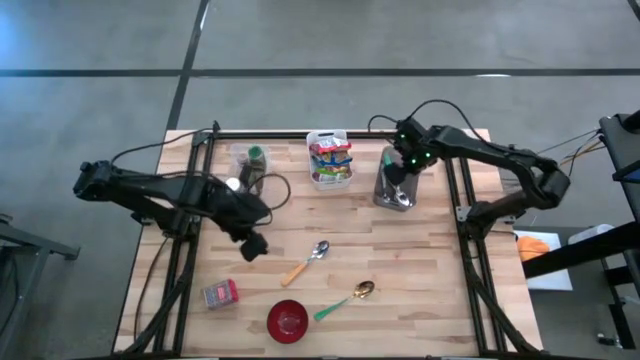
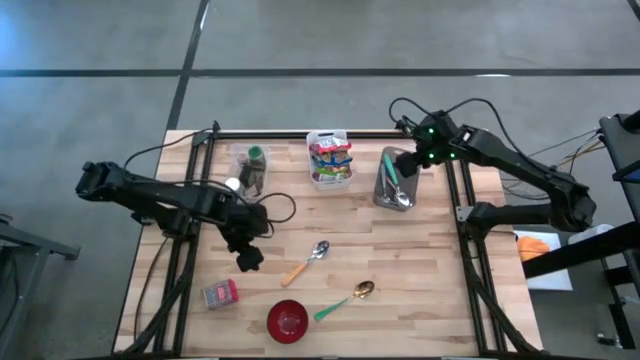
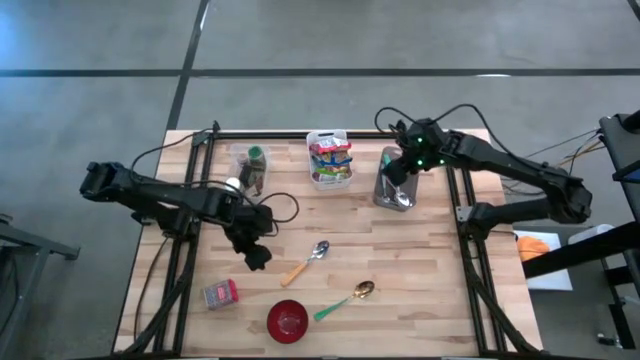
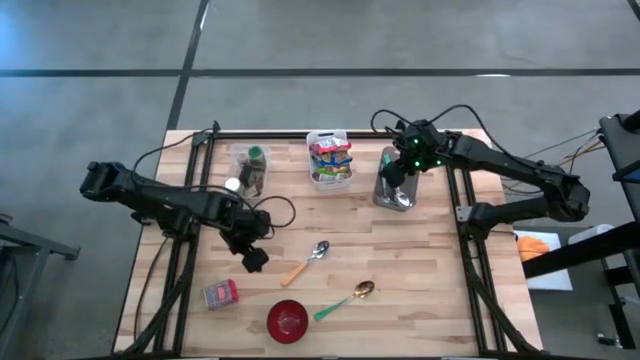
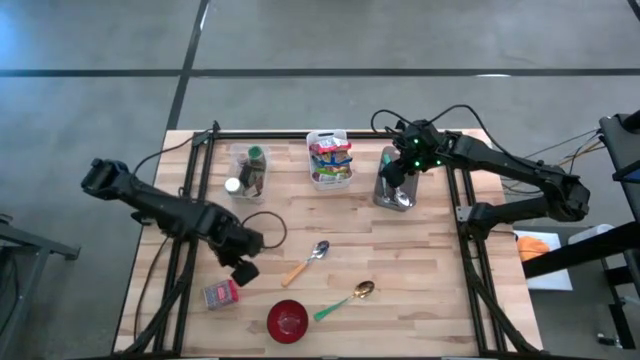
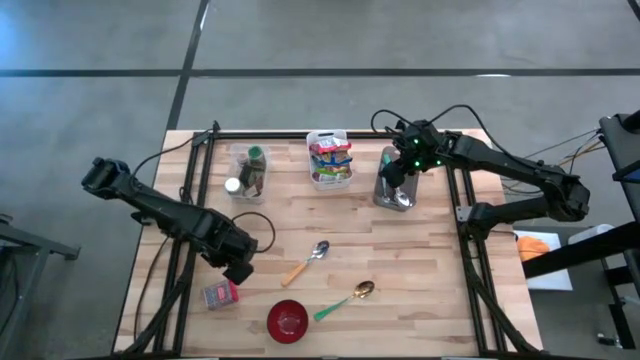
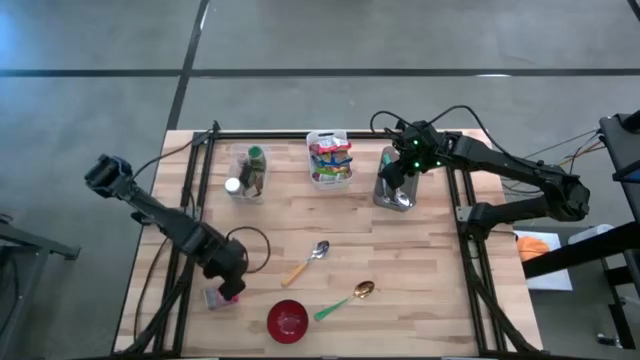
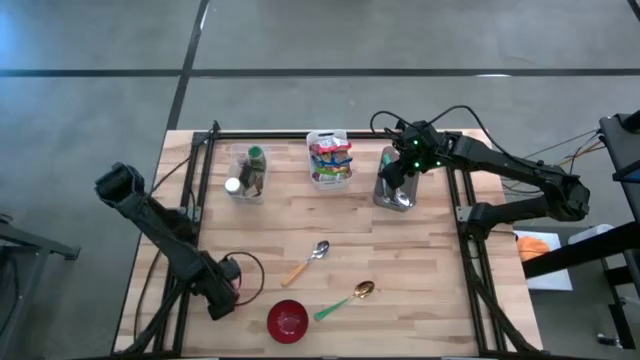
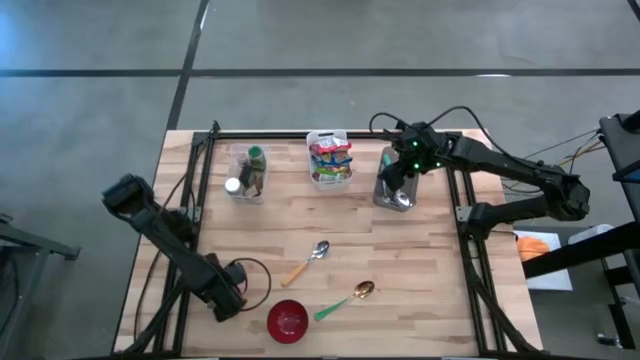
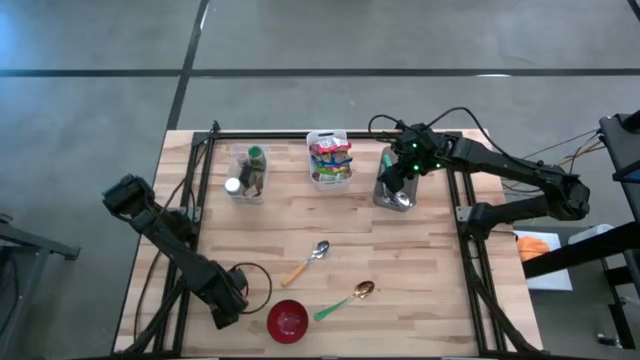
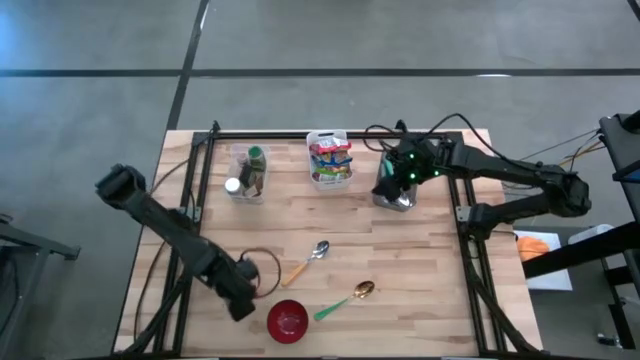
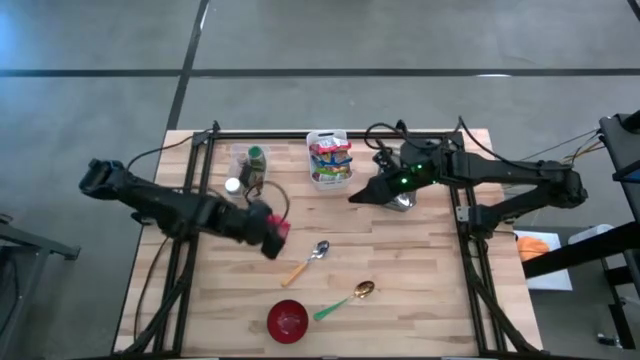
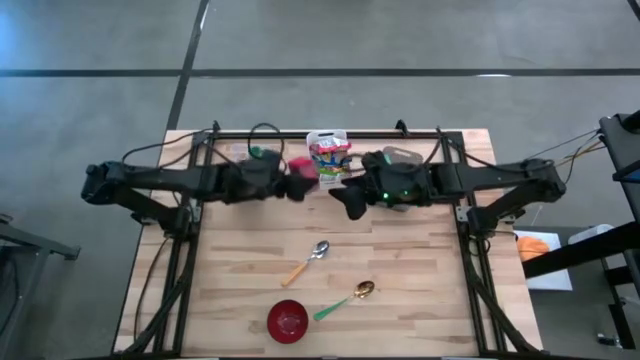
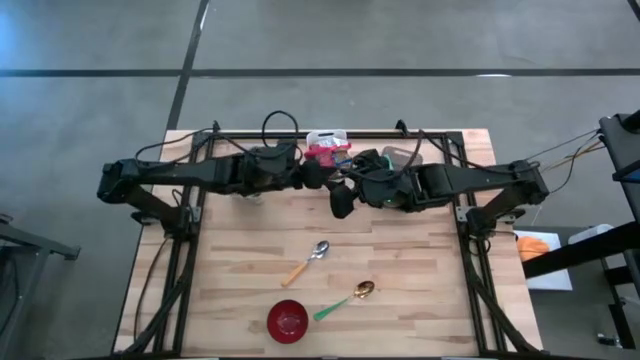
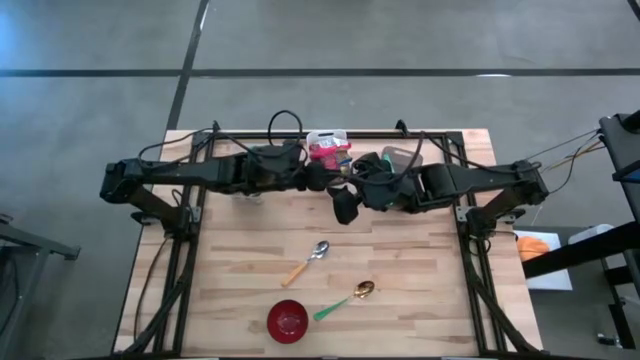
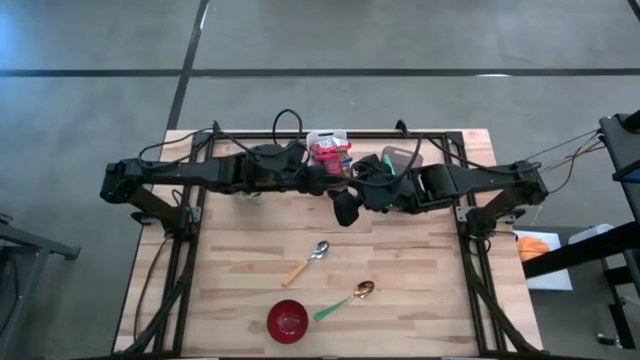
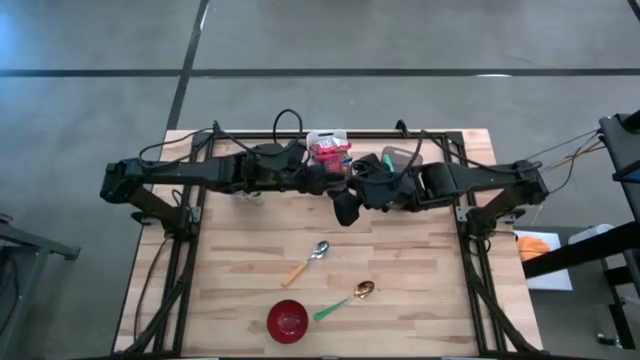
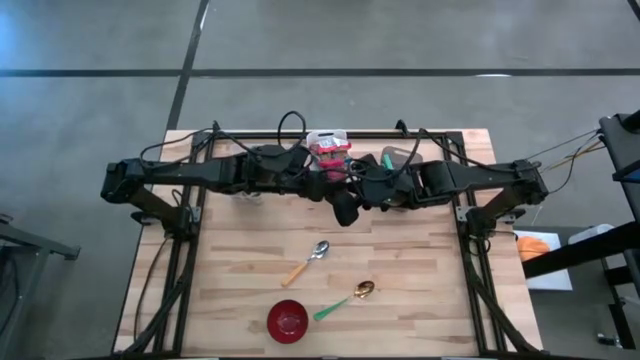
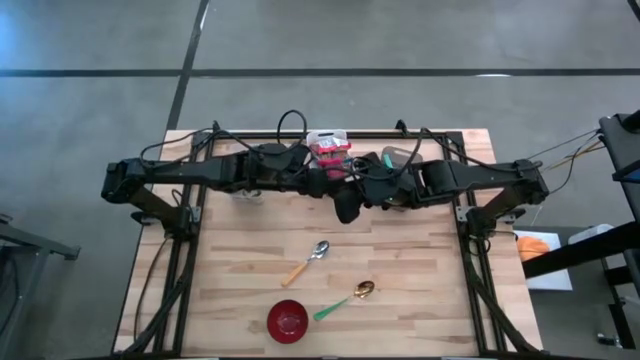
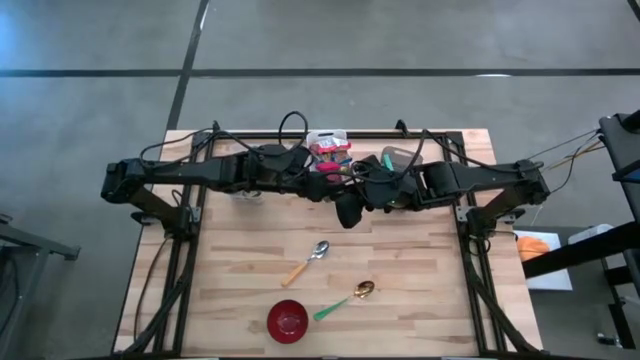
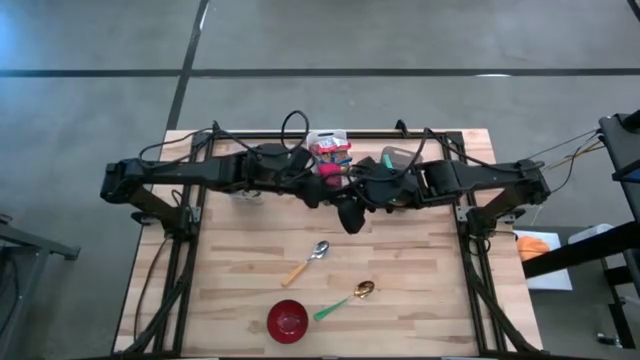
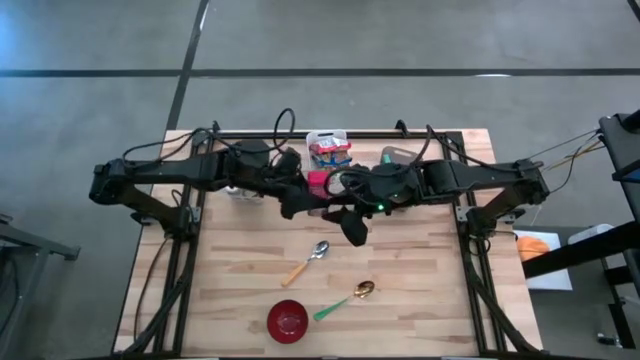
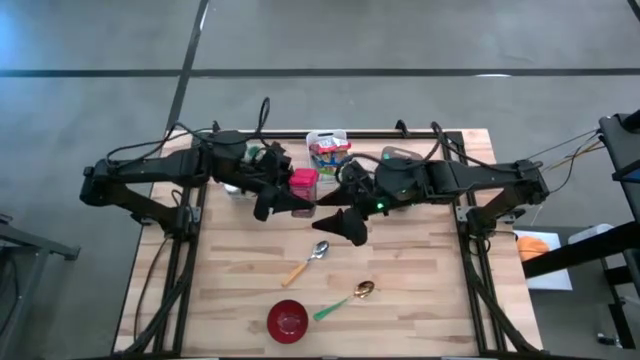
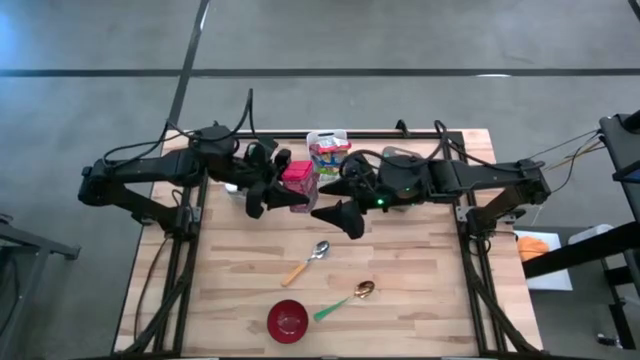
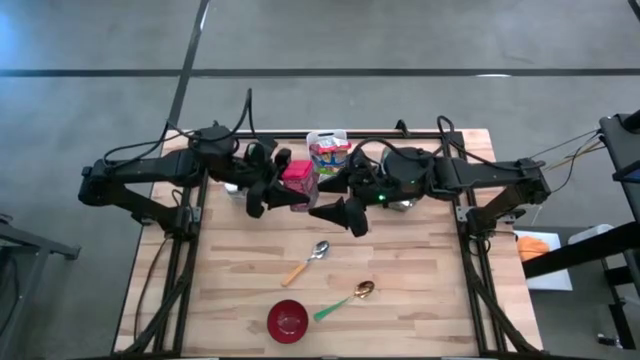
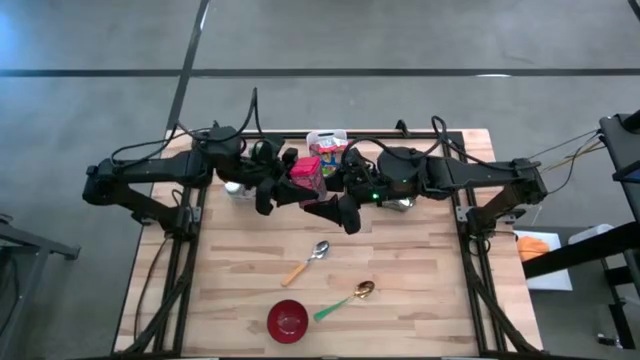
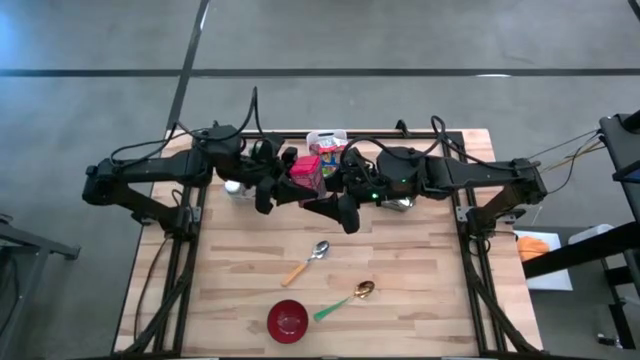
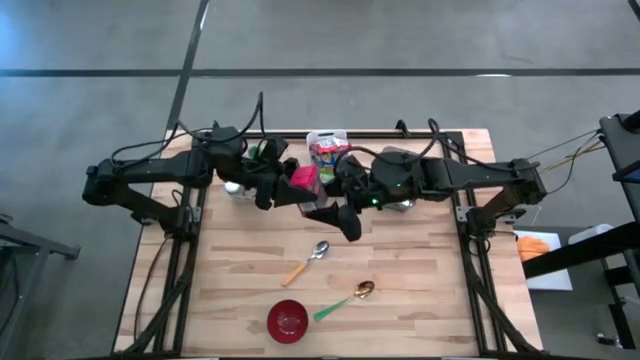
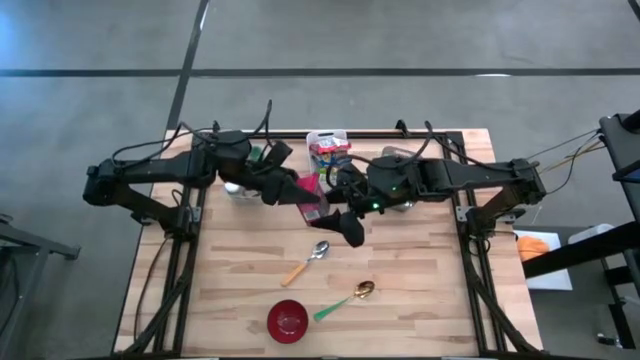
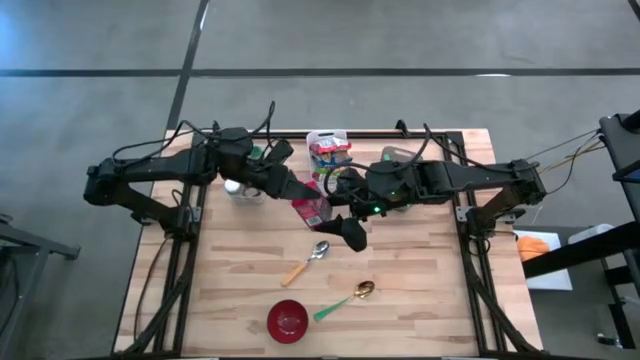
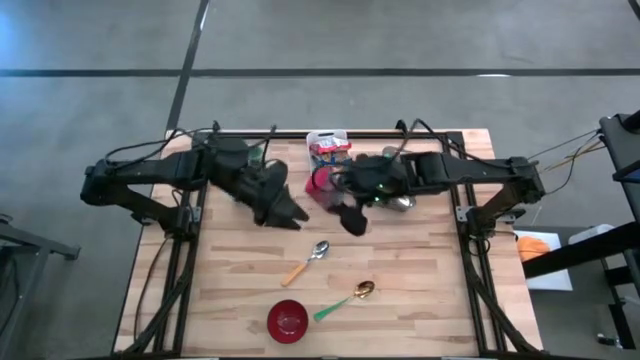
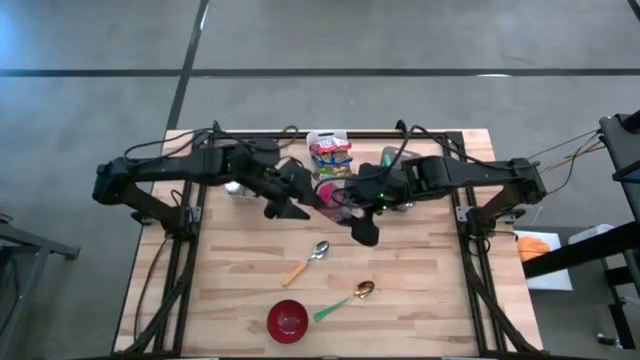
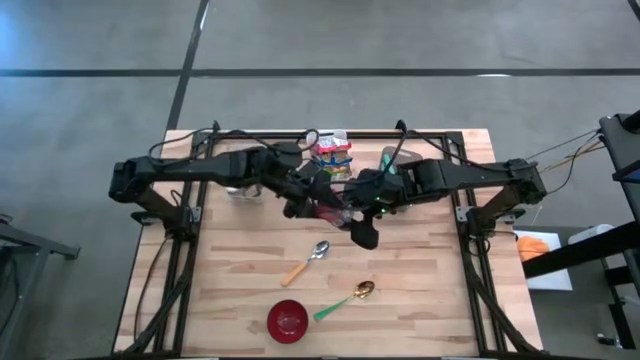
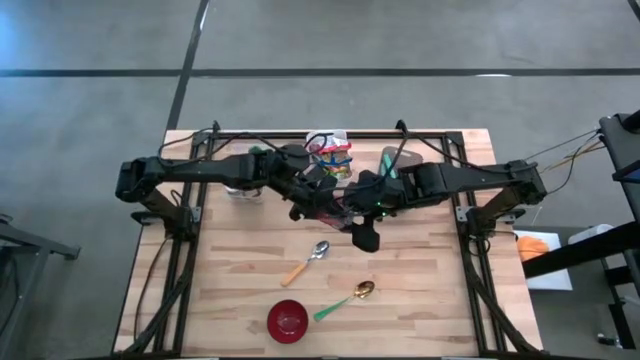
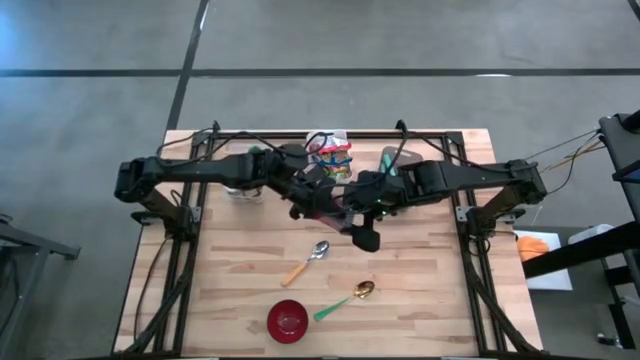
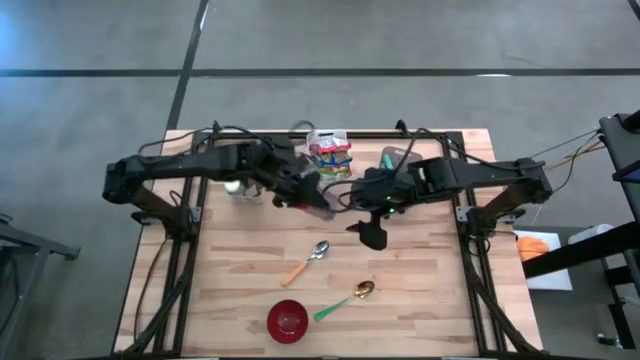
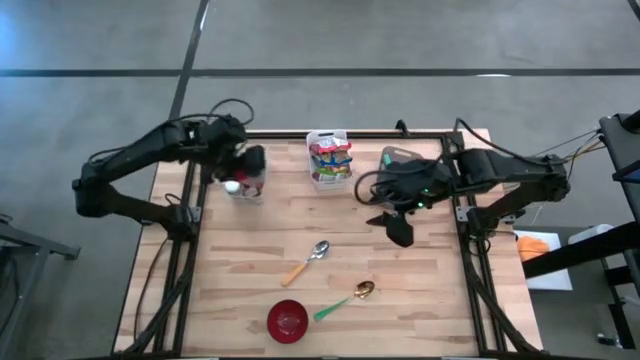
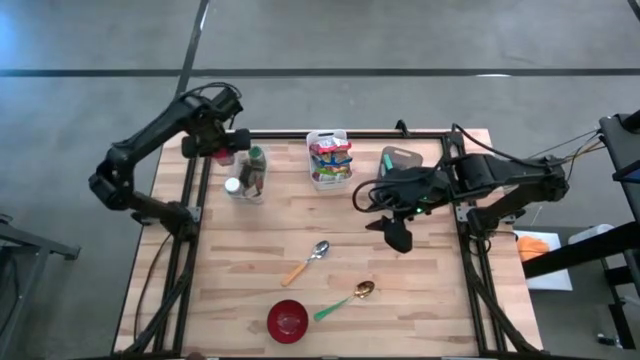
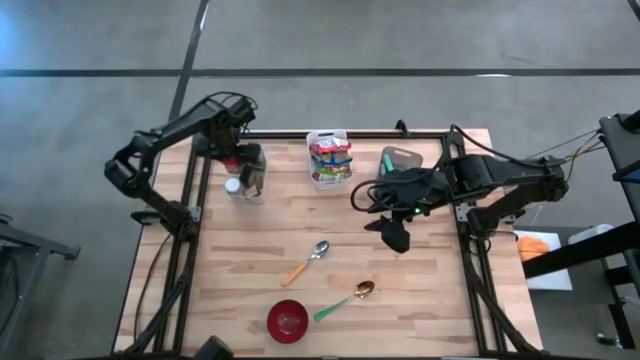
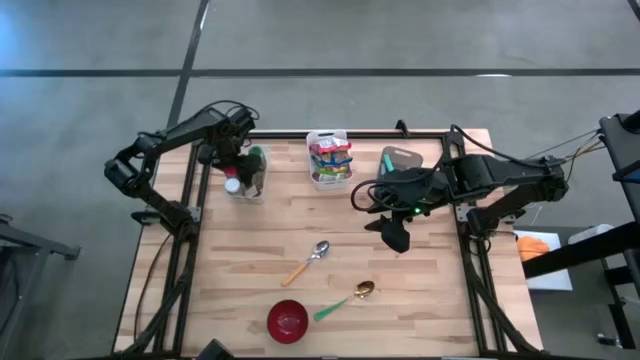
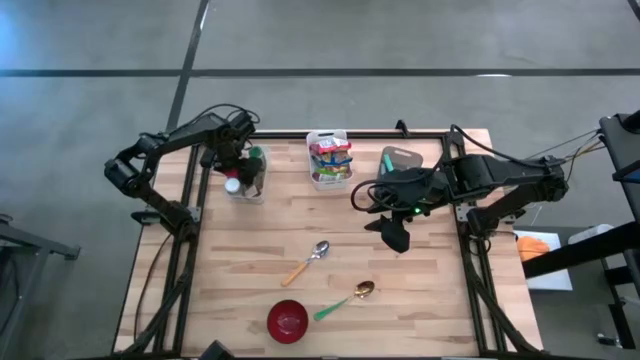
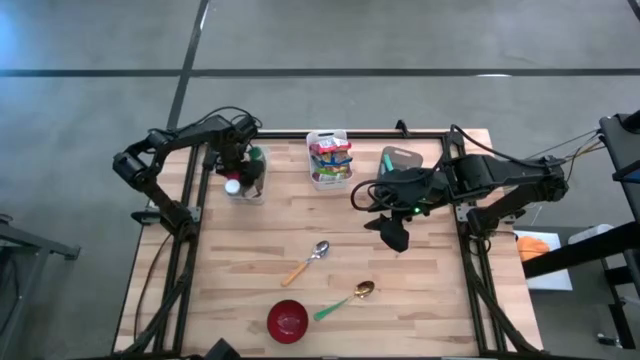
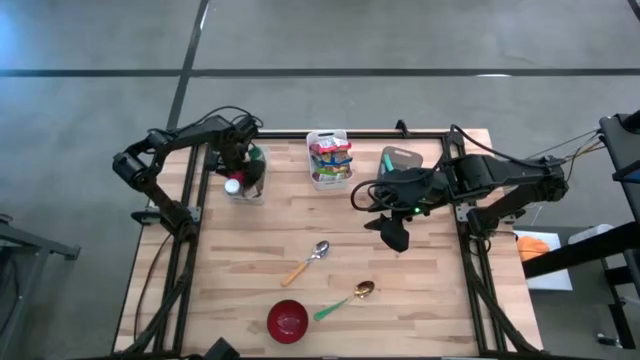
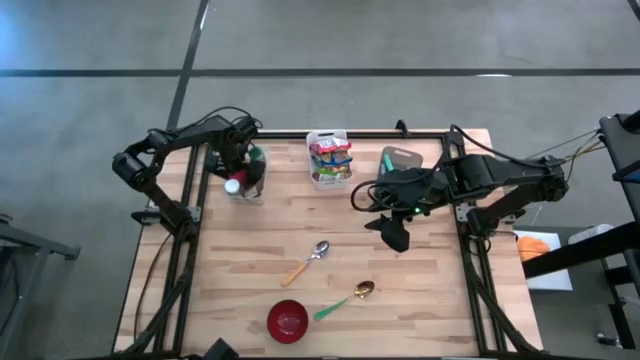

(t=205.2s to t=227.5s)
Put the red seasoning can into the transparent bin
